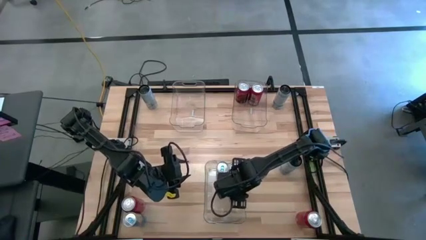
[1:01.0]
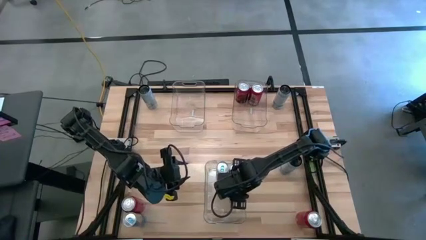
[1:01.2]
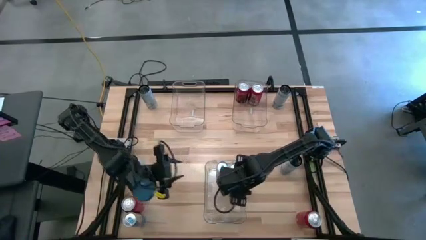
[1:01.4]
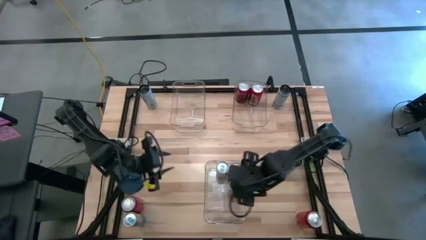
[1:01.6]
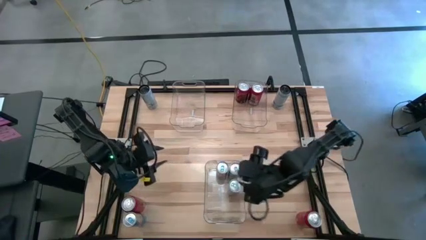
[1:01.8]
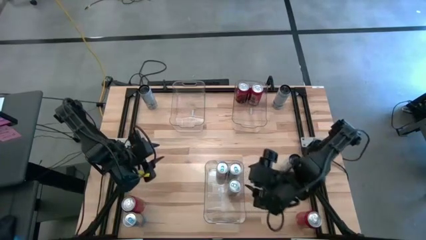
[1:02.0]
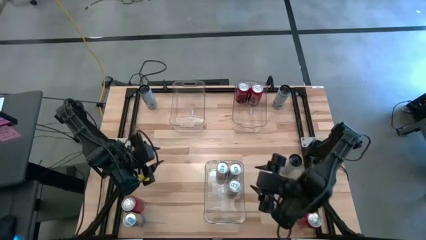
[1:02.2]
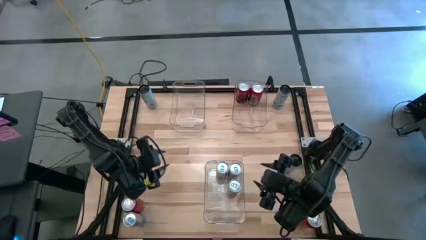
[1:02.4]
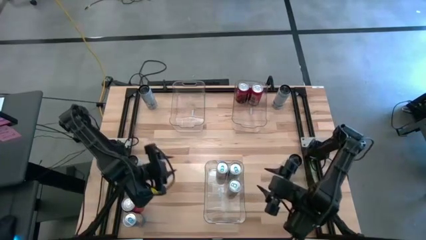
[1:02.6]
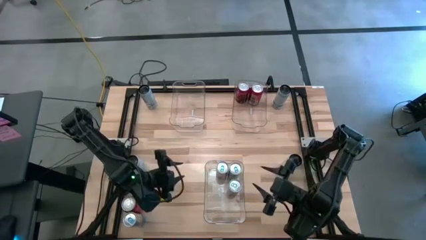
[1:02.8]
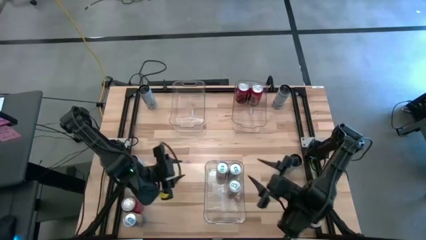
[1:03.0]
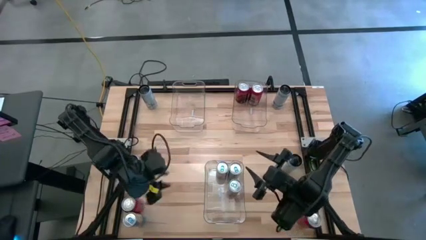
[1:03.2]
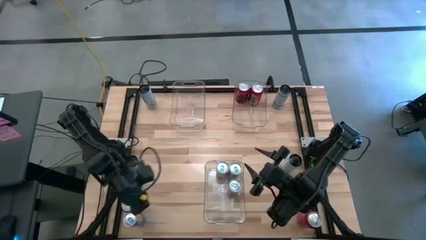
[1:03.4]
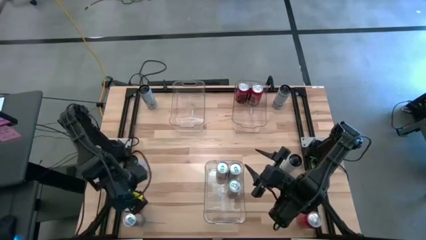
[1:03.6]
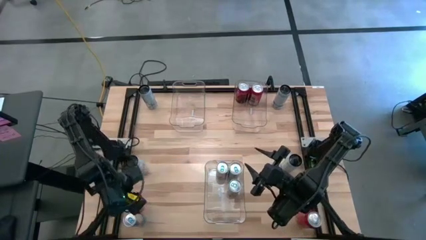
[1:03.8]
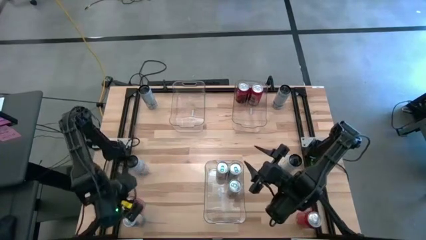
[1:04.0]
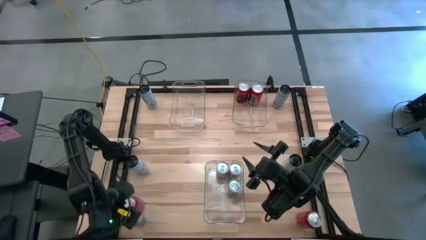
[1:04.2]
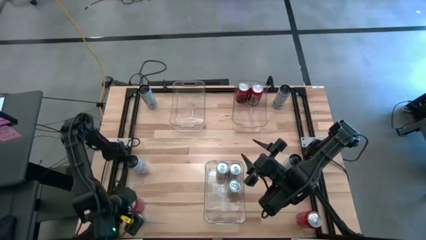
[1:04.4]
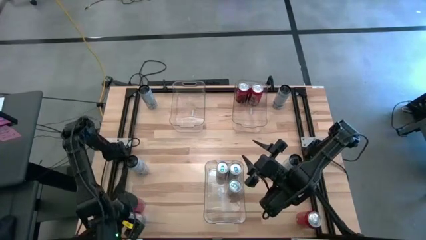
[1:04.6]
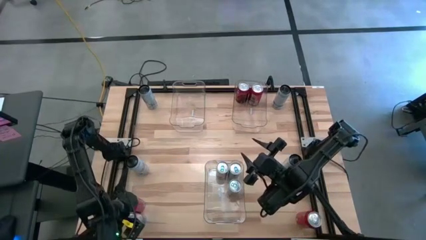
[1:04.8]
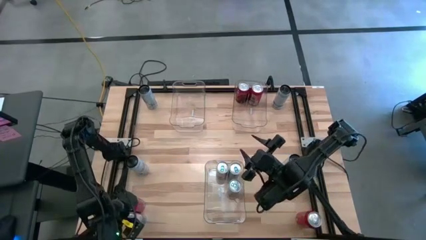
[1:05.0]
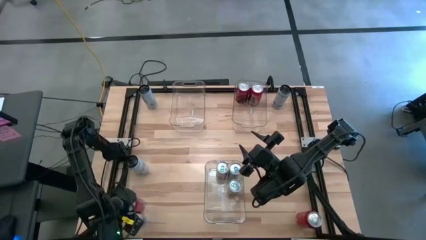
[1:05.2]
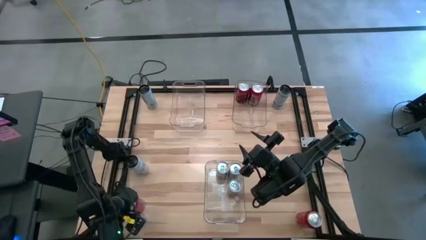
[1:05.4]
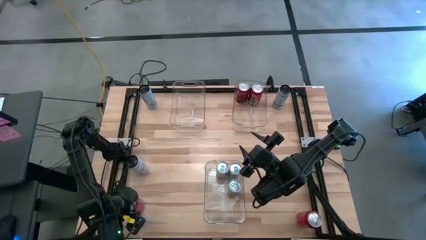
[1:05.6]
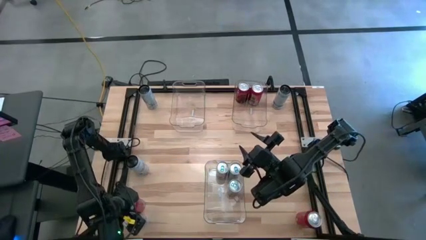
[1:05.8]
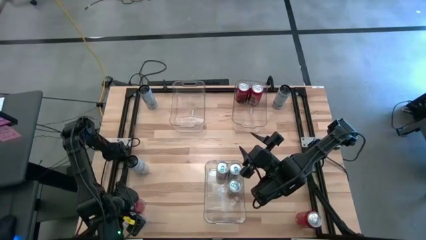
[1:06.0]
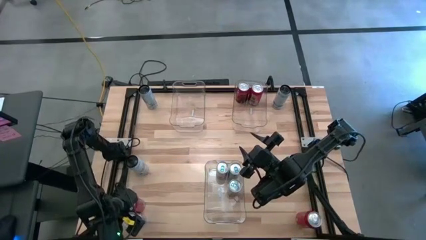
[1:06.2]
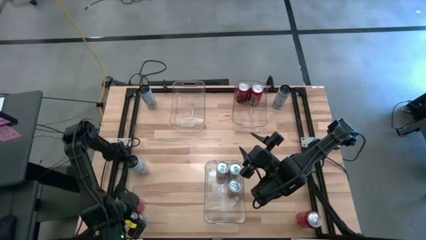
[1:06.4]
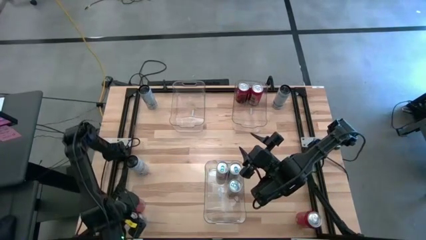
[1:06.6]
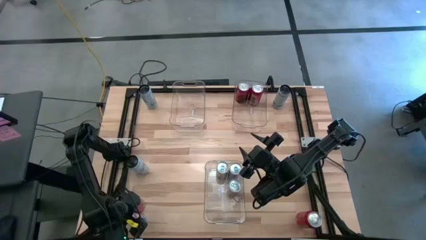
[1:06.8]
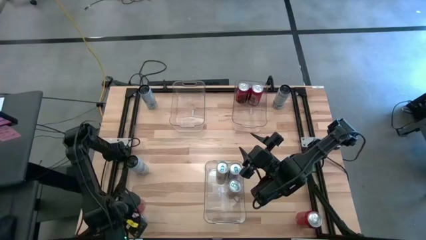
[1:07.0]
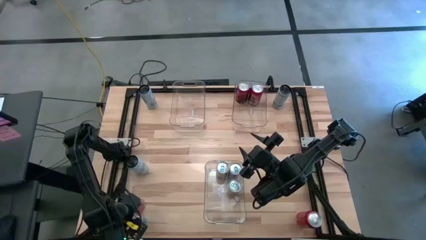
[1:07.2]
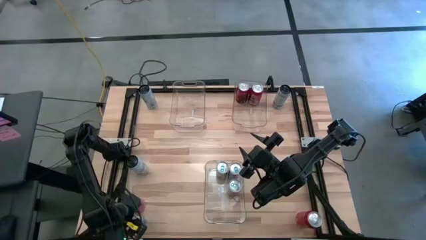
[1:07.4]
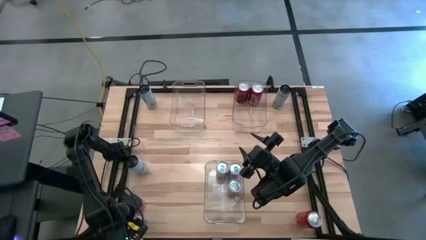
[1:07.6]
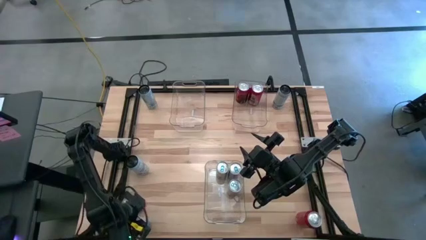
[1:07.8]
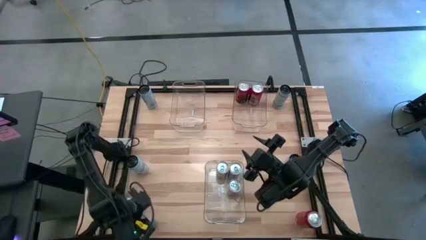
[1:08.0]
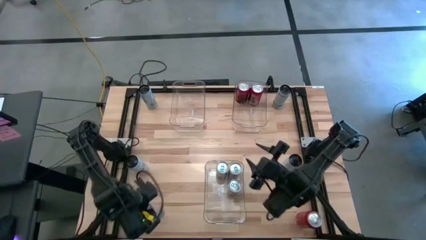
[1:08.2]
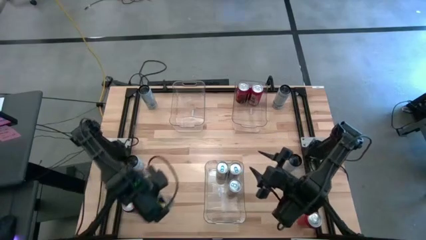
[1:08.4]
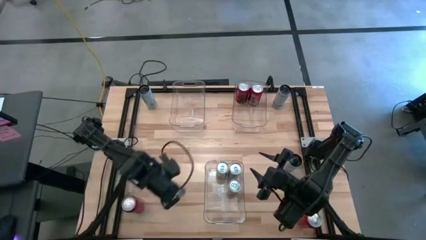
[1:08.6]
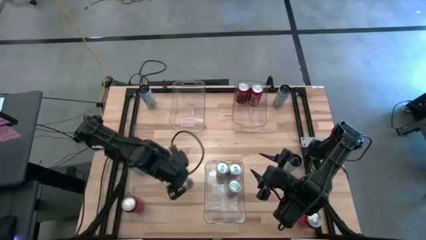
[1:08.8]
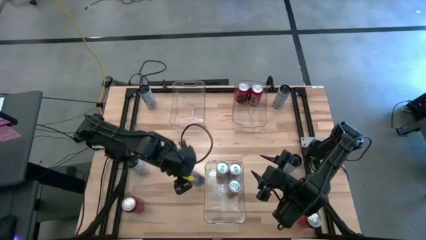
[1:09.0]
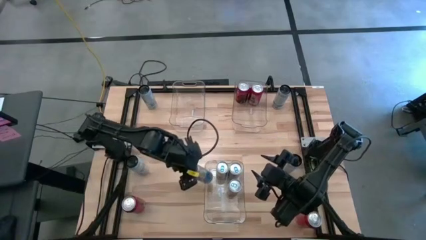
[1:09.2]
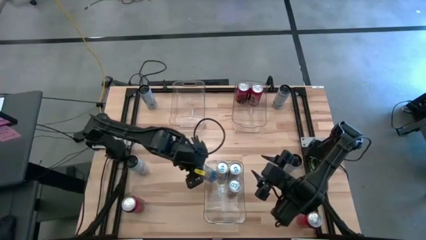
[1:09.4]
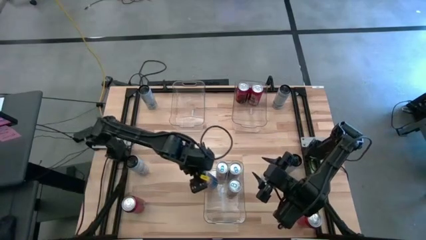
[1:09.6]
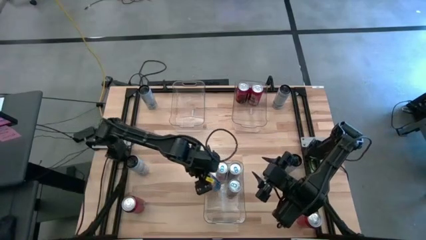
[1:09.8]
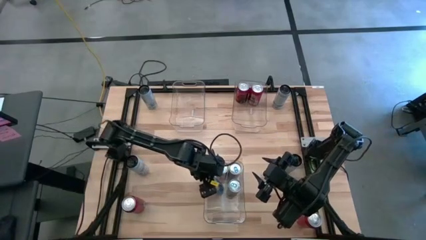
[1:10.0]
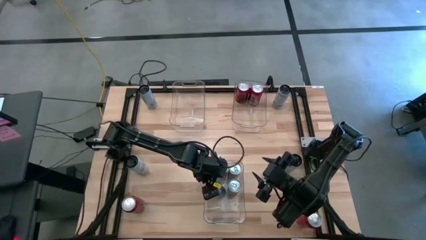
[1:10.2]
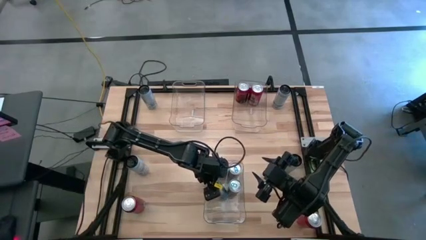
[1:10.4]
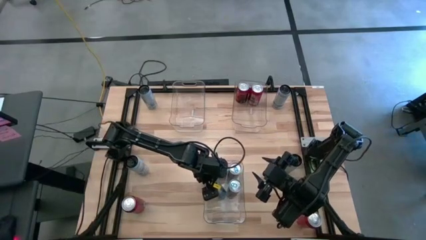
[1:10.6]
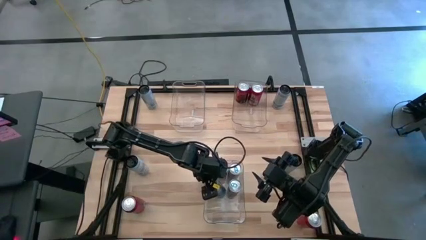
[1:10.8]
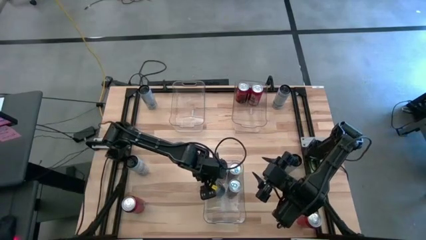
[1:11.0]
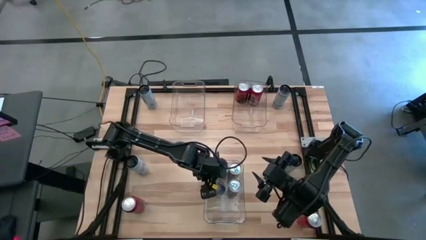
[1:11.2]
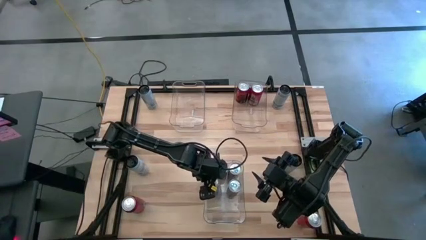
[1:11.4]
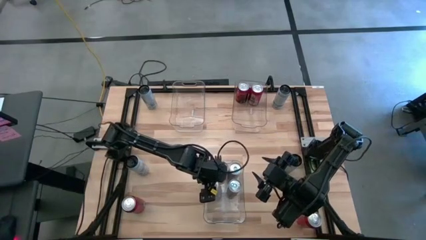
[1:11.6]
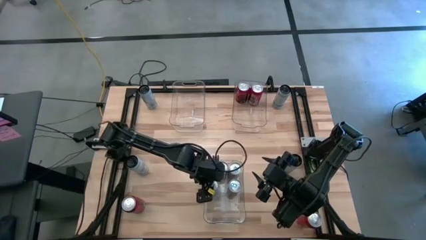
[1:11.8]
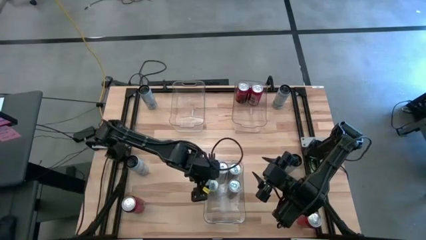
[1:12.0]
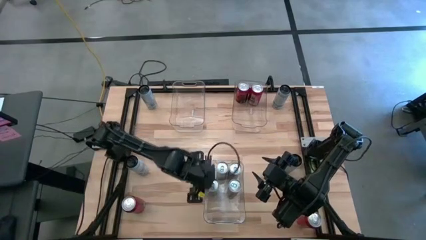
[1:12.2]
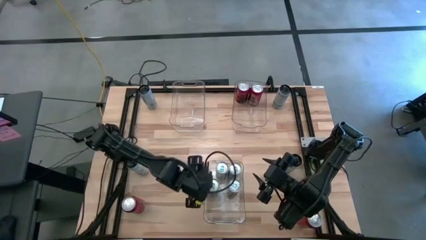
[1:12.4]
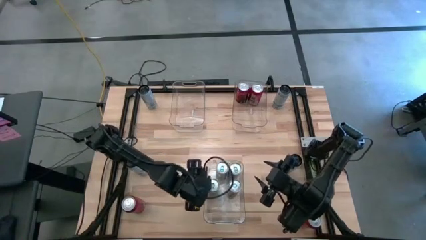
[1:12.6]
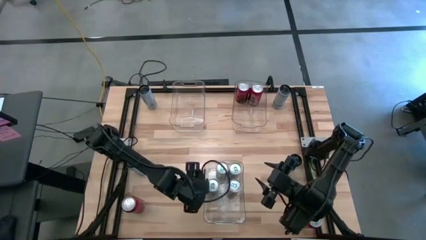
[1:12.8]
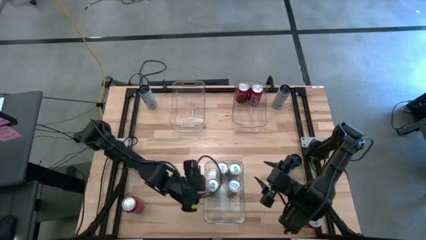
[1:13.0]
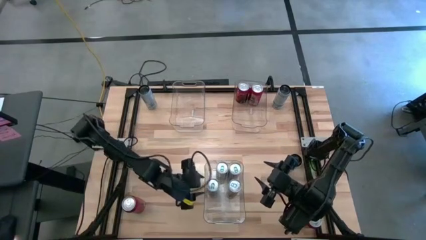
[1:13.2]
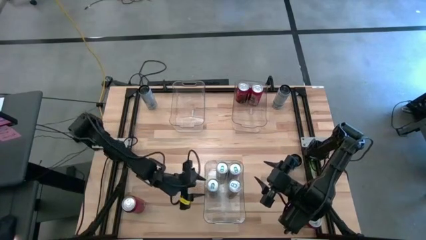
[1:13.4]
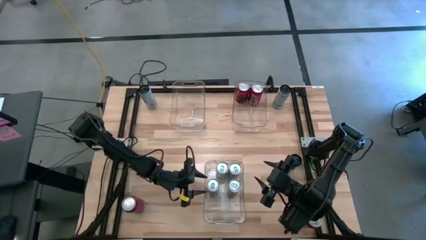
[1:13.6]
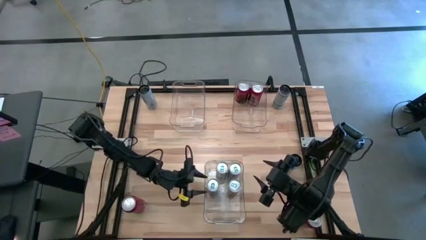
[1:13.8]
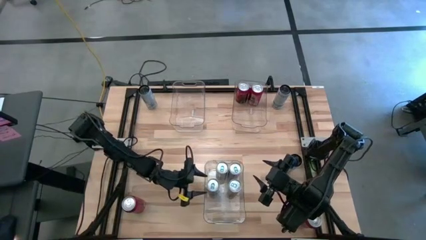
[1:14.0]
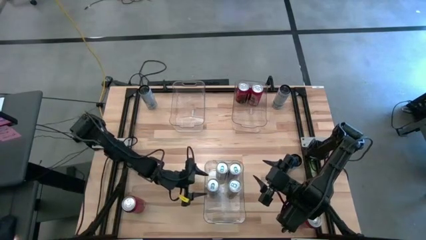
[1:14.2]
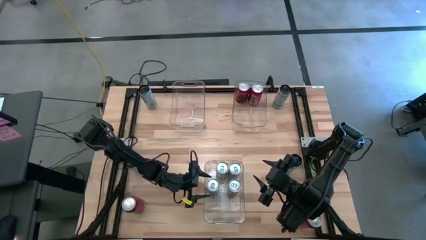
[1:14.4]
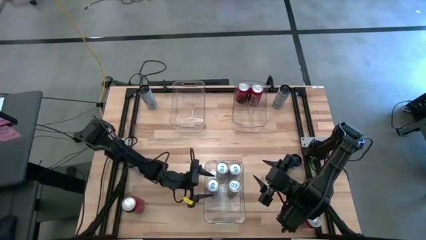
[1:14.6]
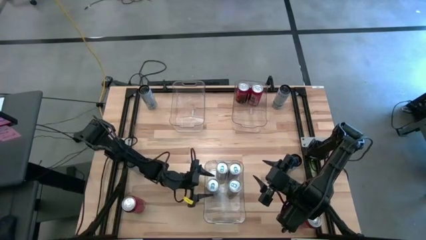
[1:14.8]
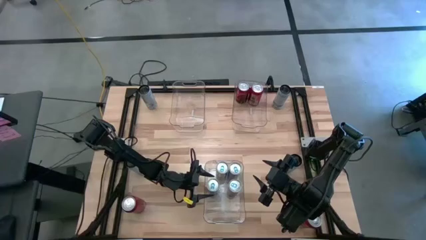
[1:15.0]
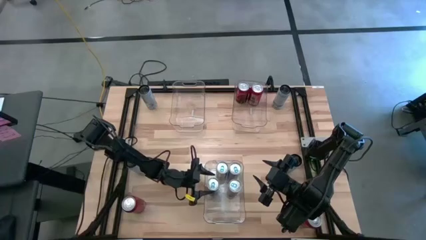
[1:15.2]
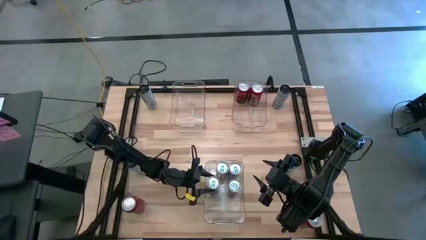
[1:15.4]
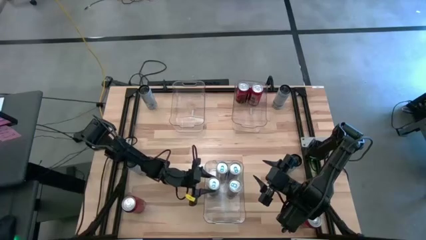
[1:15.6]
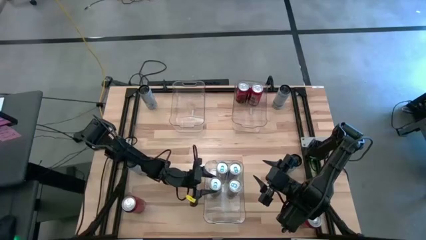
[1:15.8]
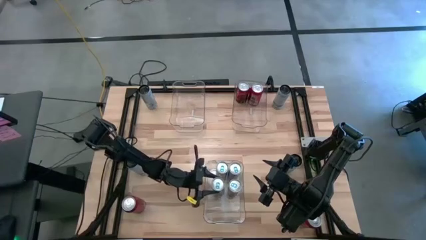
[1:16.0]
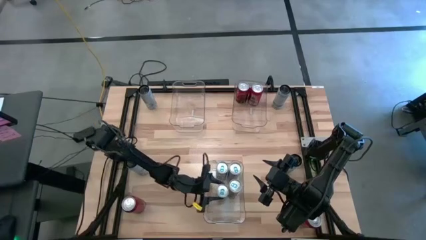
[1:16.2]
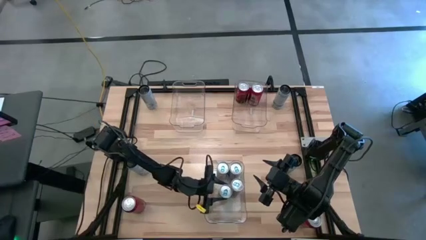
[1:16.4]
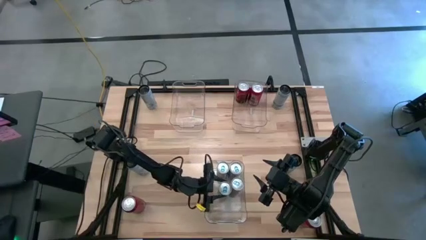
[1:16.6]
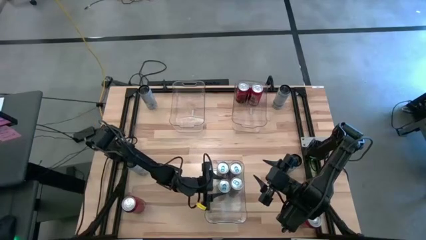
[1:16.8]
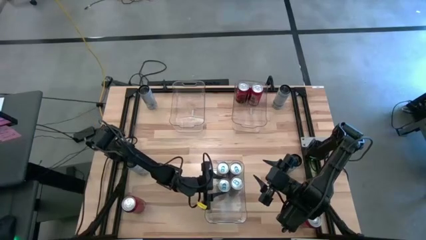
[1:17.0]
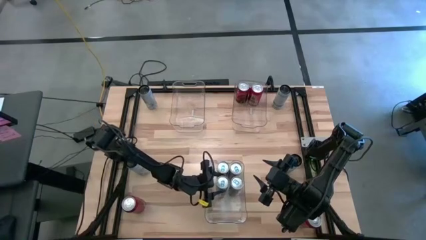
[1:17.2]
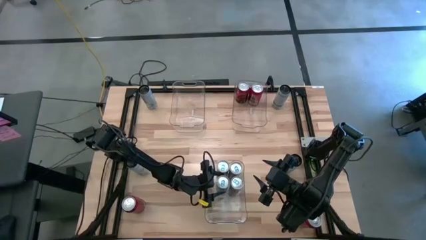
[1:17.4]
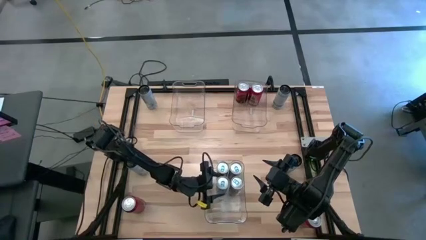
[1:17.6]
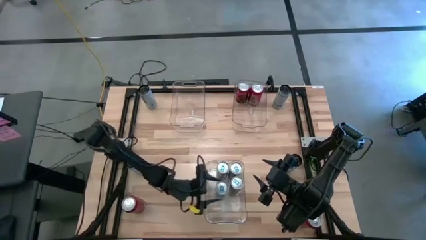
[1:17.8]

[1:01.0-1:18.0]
Task: Sort soda cans
Put the blue soda can into the bottom transparent bin
